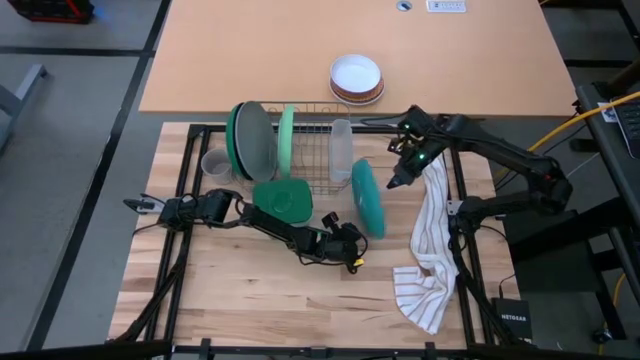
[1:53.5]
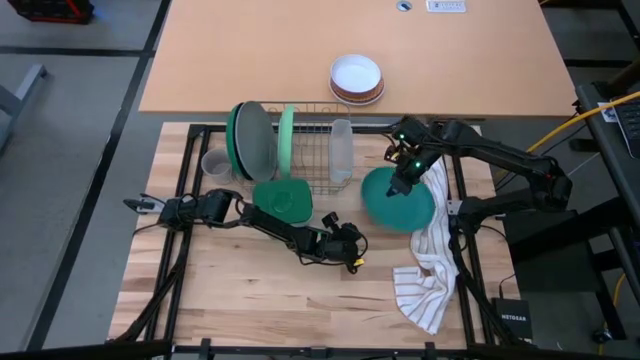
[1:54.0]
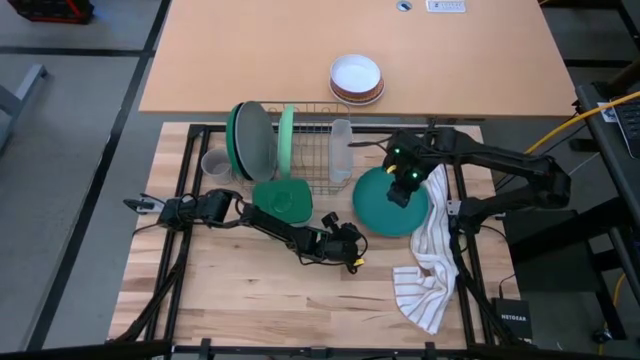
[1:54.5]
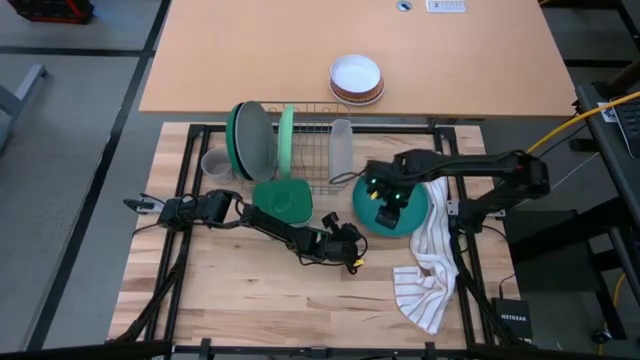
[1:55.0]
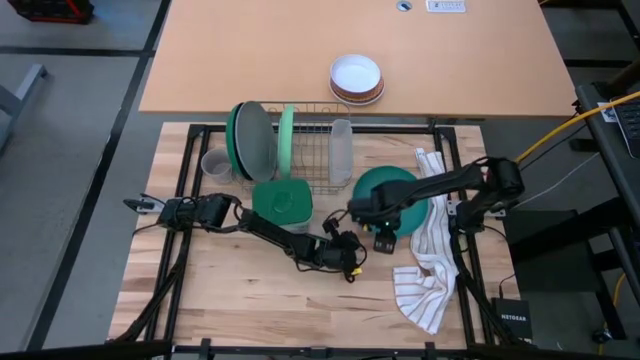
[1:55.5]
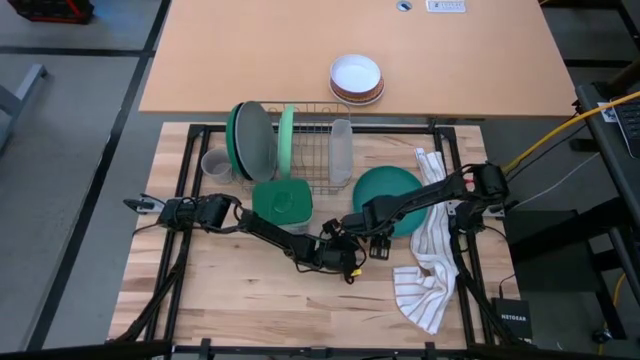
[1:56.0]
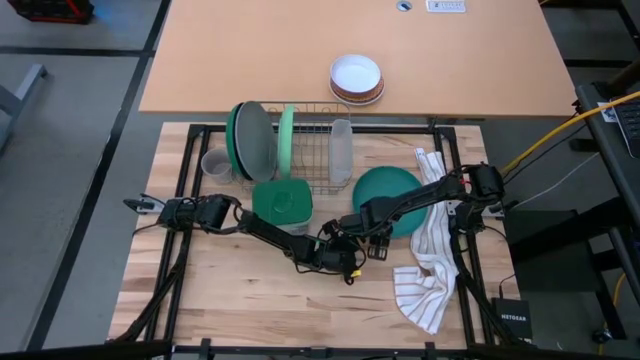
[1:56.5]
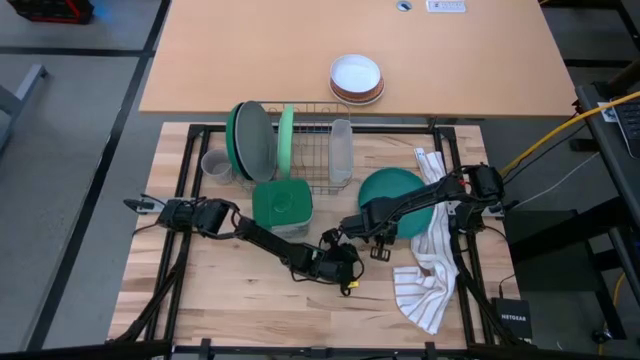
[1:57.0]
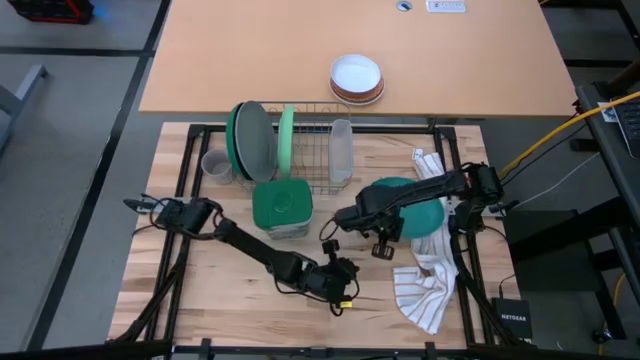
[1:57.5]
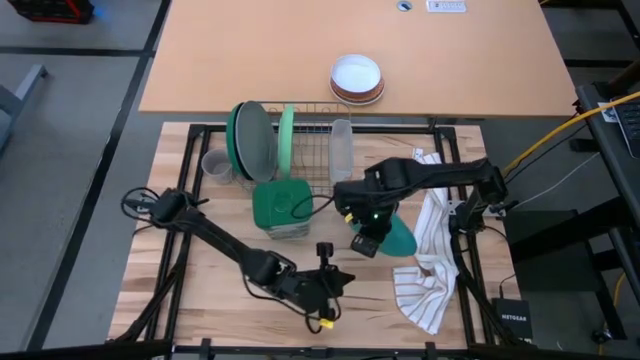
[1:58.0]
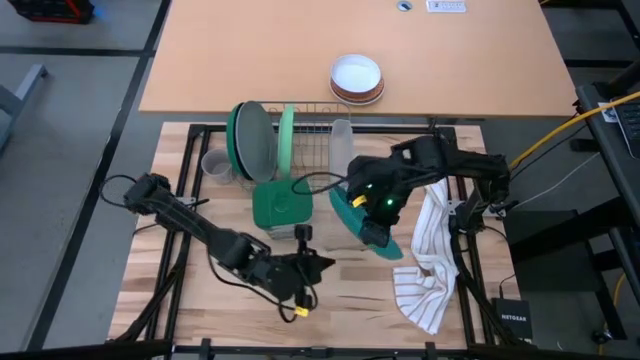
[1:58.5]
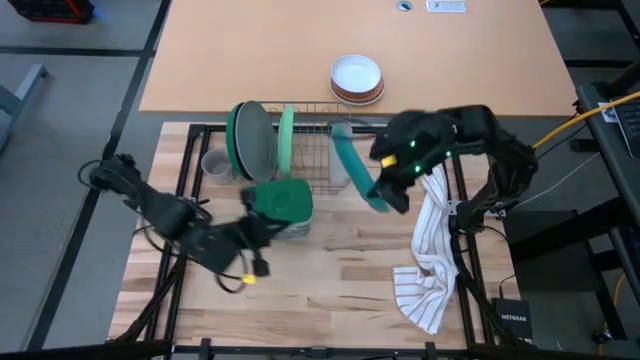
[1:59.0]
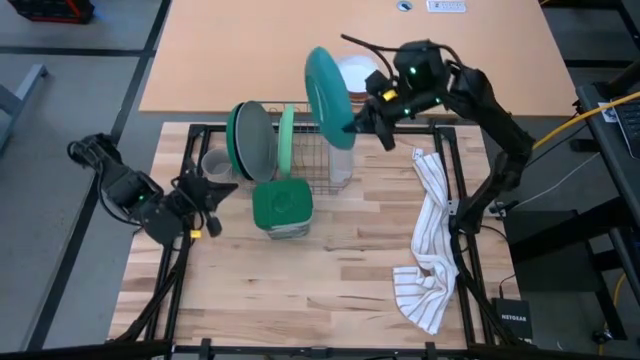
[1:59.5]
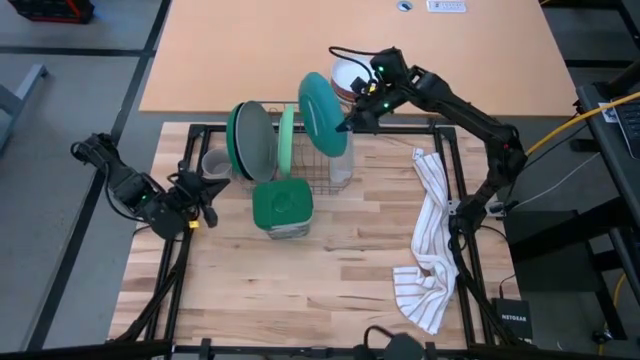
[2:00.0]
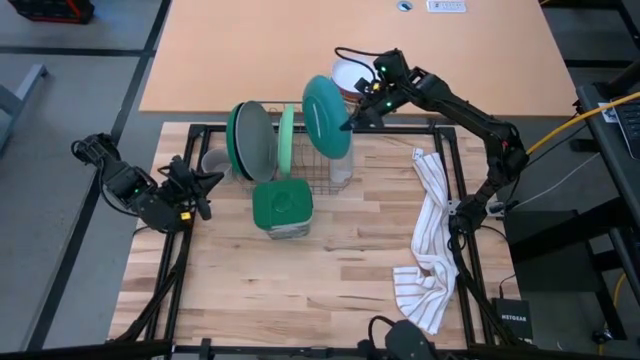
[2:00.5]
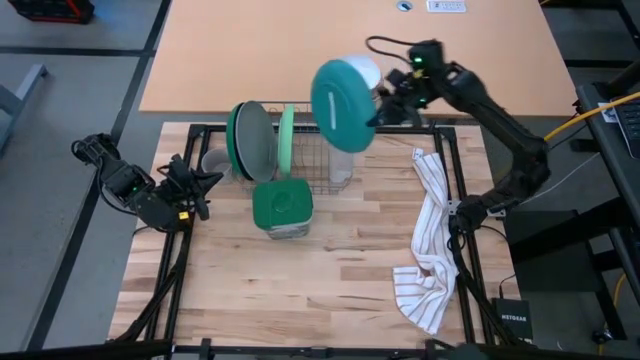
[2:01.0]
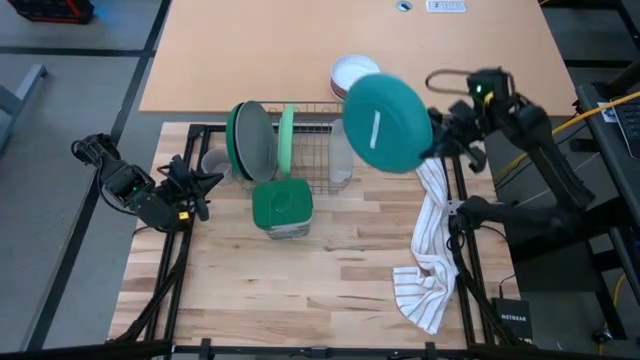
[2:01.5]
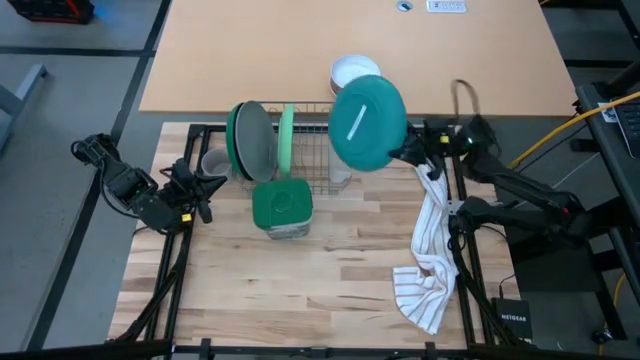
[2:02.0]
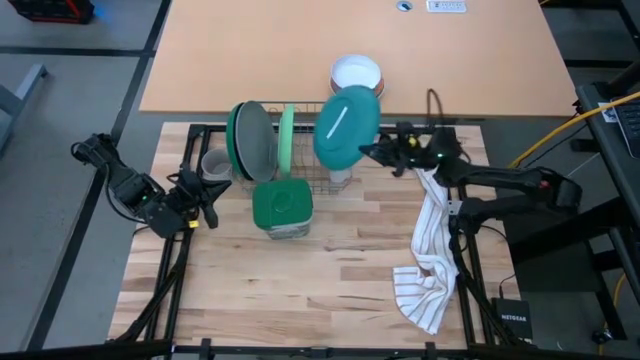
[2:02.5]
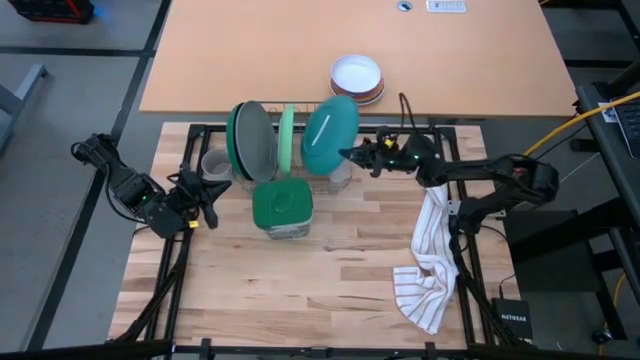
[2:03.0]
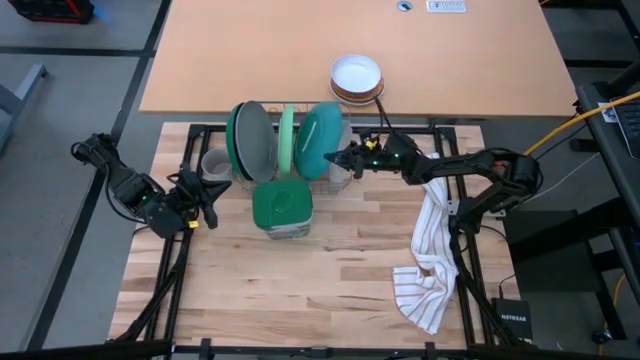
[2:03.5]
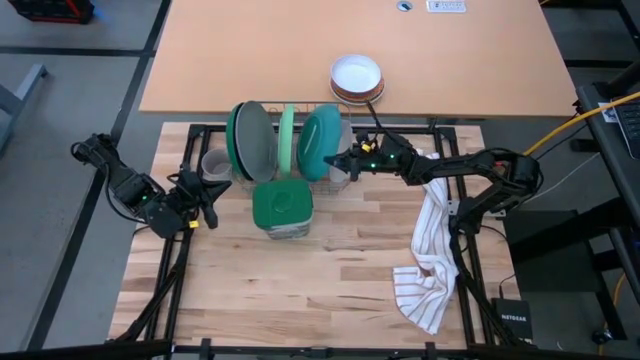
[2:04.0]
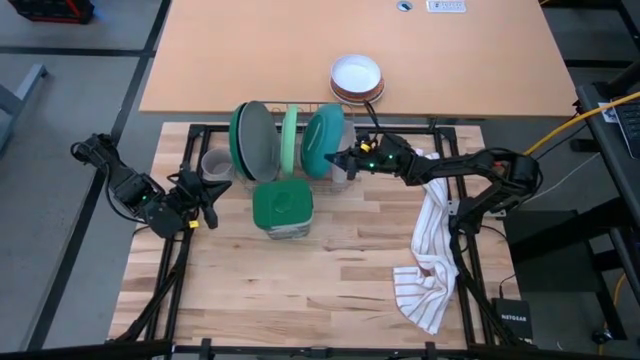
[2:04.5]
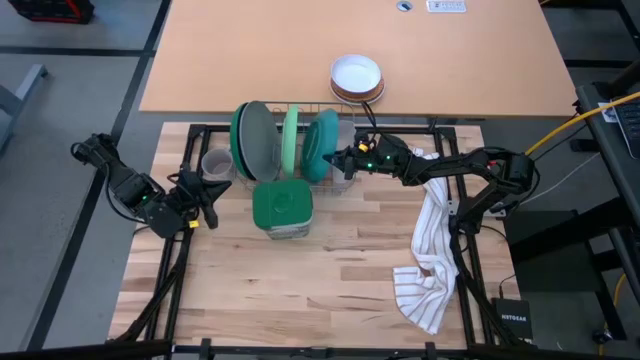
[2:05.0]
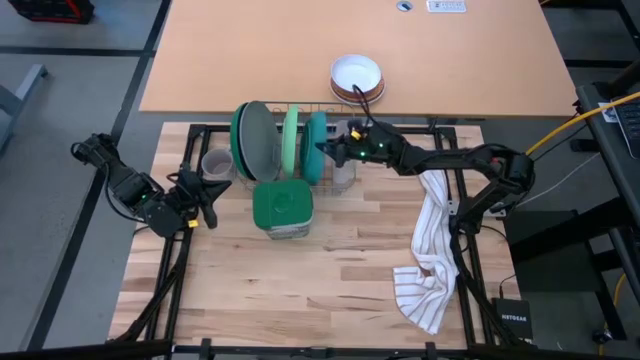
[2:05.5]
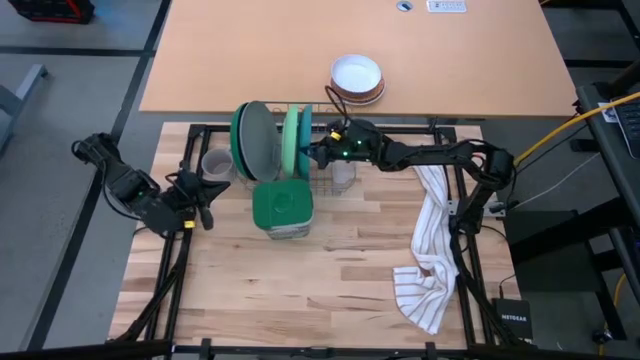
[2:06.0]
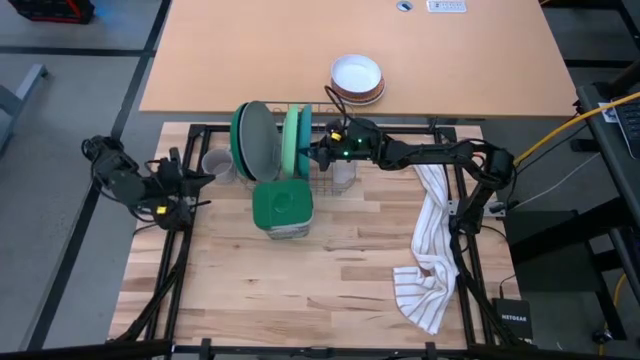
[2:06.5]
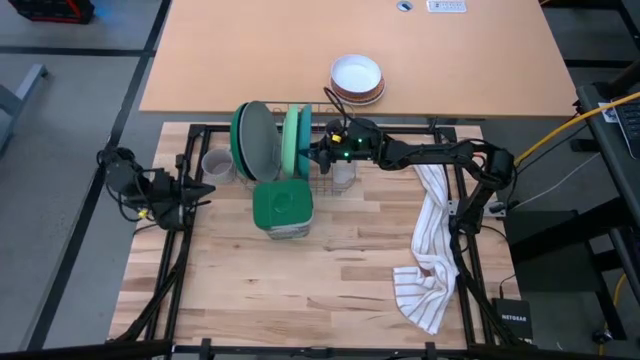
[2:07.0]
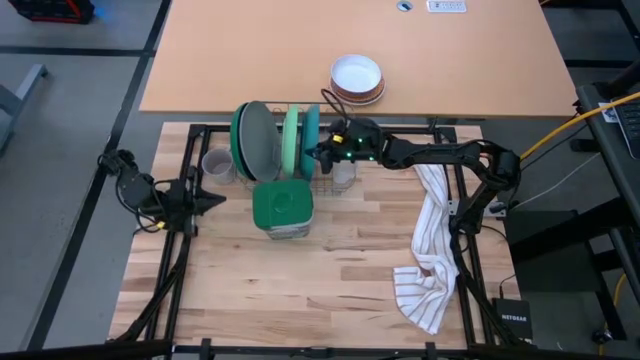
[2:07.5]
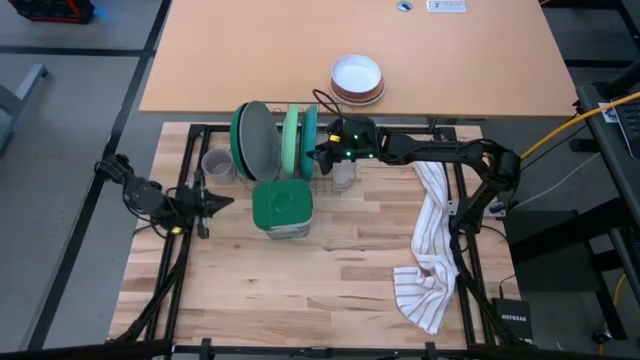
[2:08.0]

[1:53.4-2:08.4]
Task: Sort dishes
Put the blue plate into the dish rack

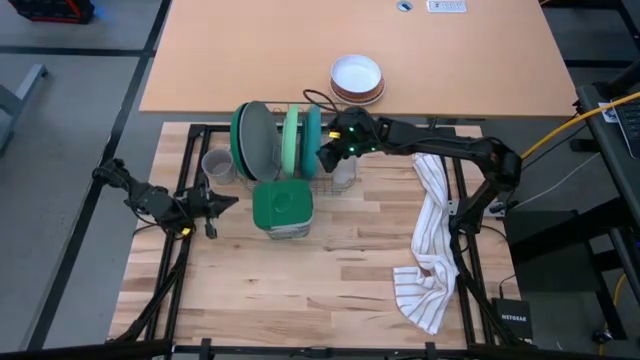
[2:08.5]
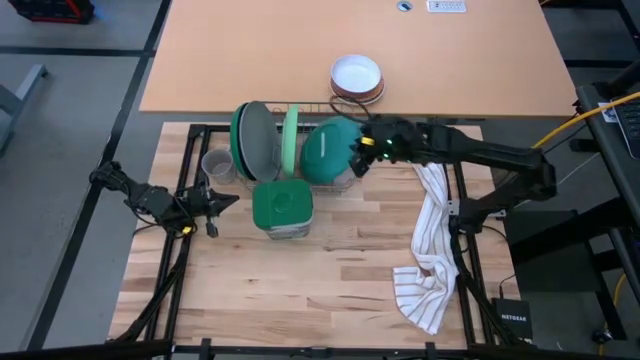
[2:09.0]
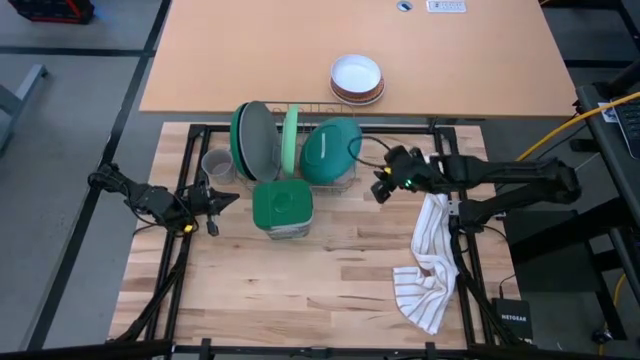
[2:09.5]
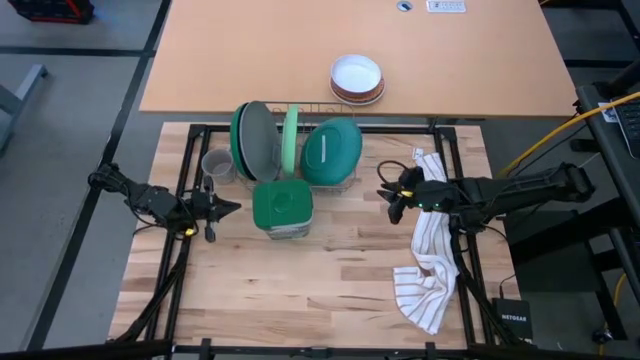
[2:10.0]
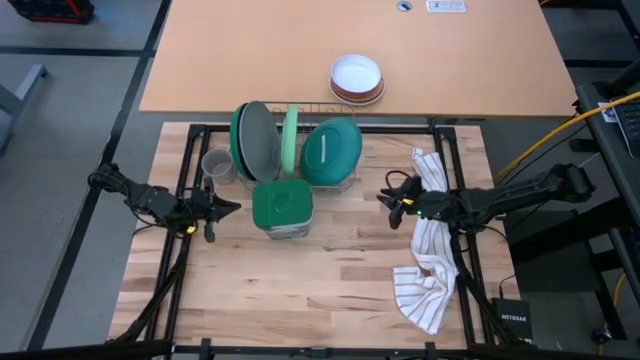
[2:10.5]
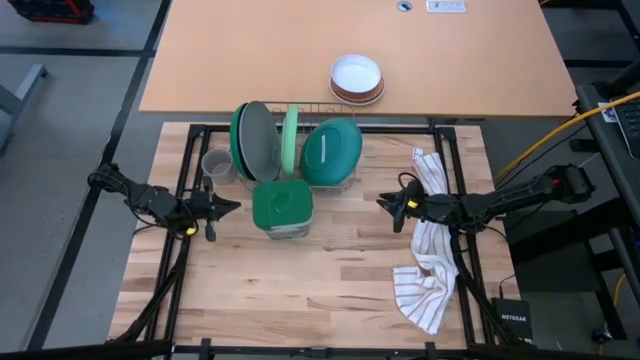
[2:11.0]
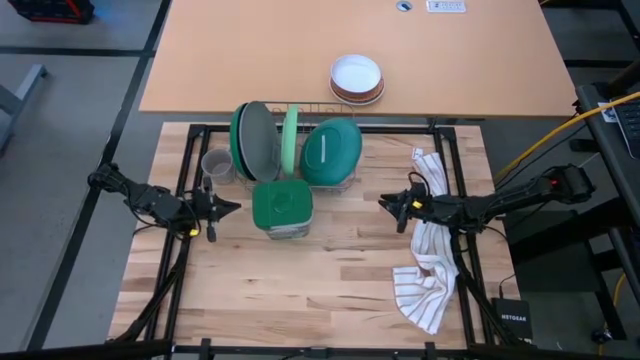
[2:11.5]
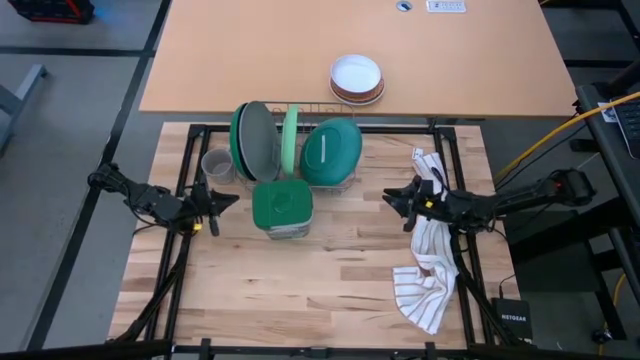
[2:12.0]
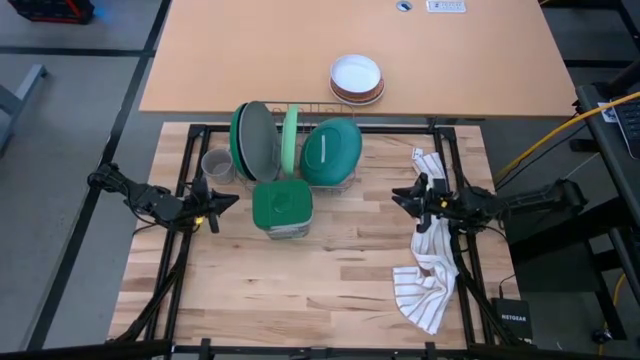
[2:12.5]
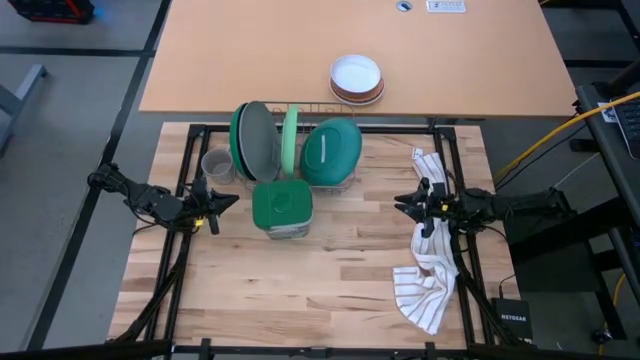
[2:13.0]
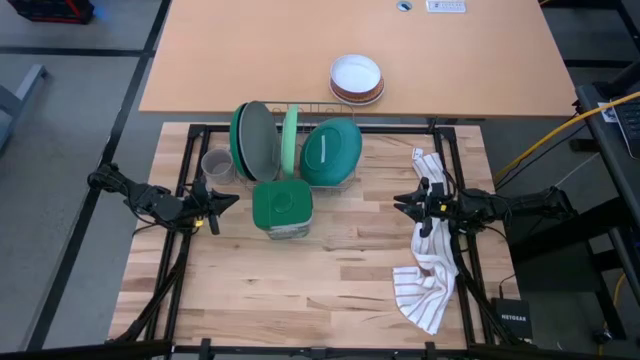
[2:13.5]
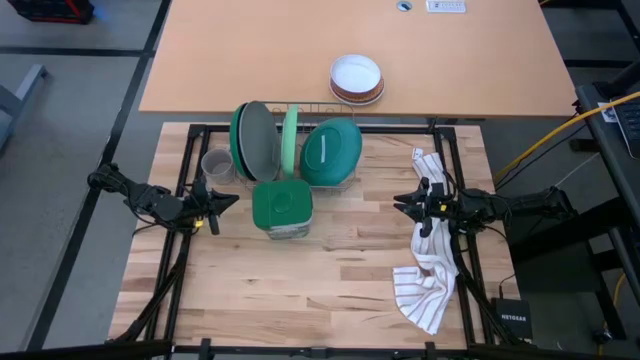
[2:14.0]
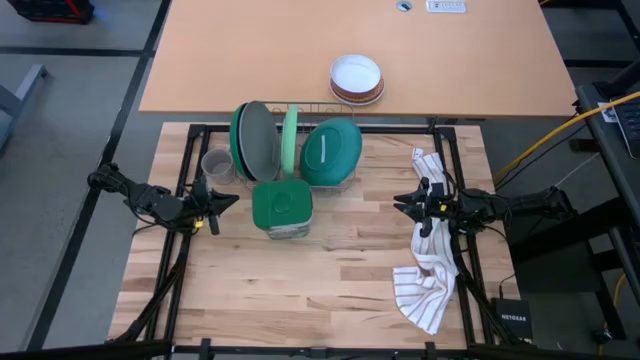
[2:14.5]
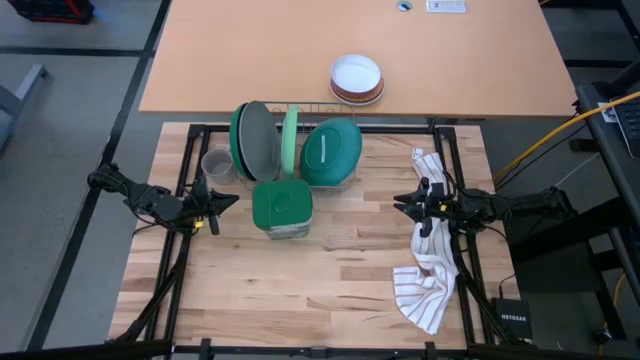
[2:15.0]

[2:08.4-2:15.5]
Return to Home Position
